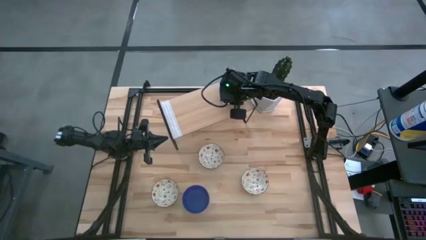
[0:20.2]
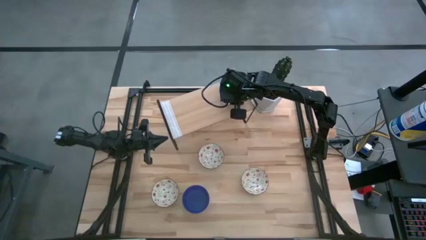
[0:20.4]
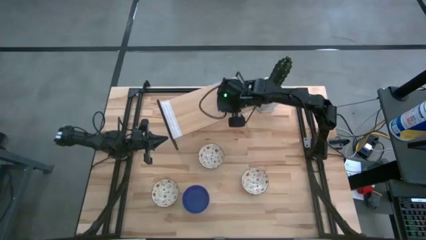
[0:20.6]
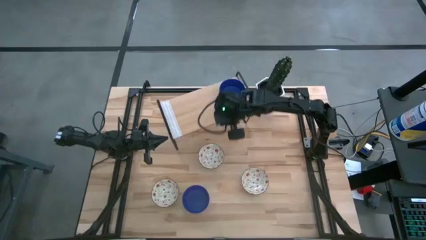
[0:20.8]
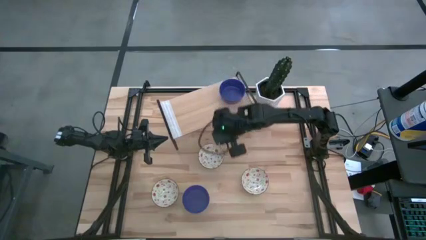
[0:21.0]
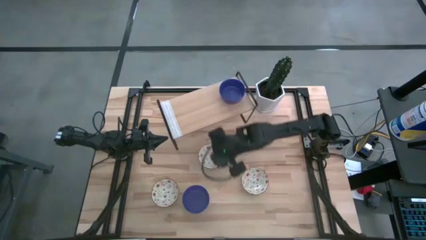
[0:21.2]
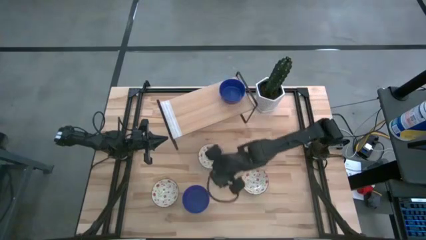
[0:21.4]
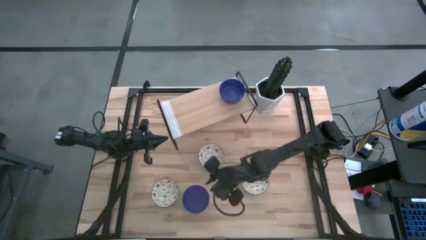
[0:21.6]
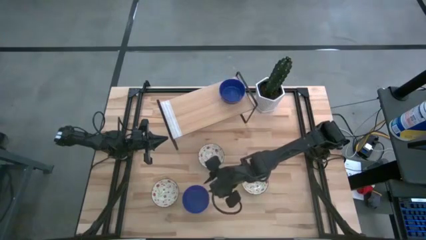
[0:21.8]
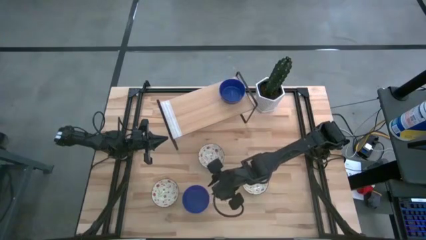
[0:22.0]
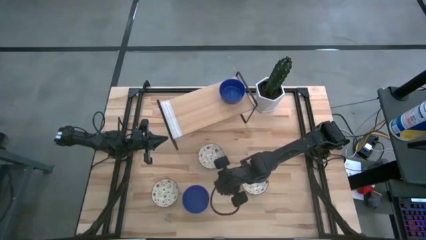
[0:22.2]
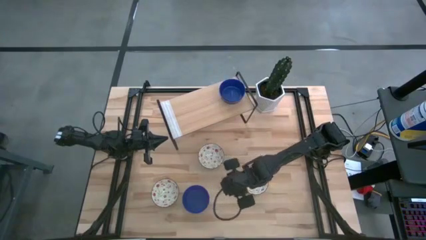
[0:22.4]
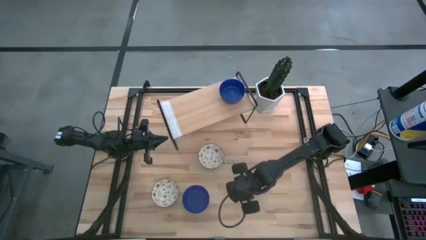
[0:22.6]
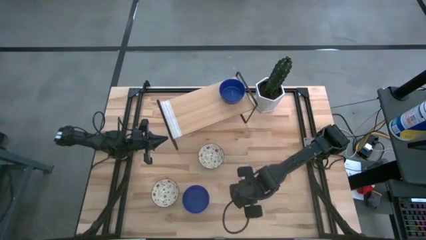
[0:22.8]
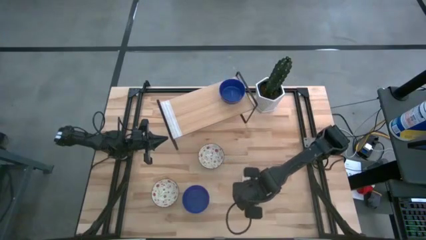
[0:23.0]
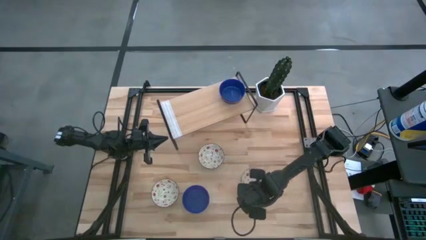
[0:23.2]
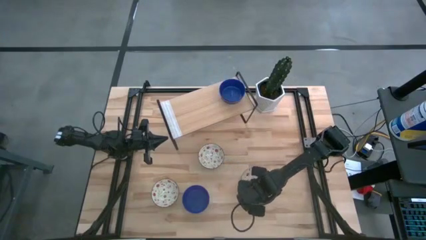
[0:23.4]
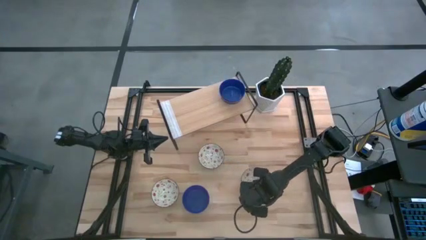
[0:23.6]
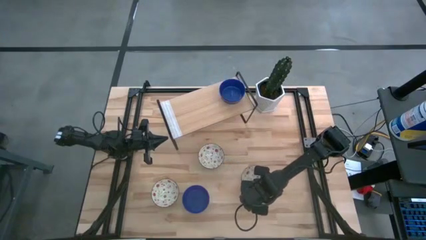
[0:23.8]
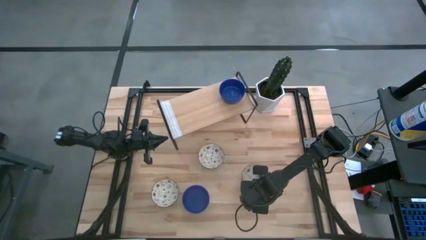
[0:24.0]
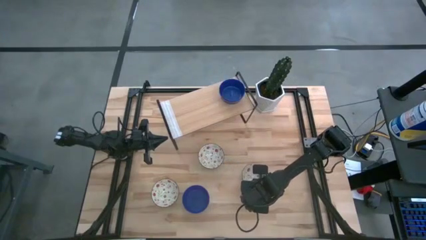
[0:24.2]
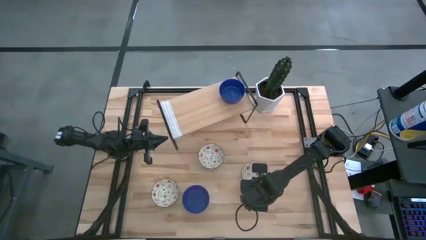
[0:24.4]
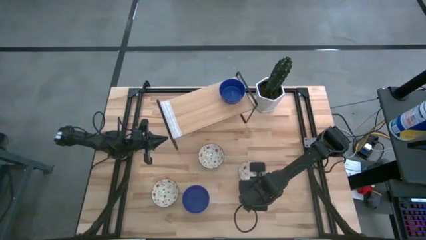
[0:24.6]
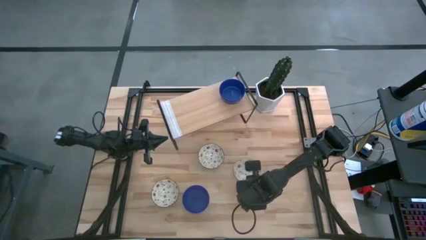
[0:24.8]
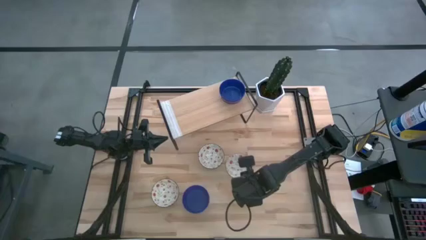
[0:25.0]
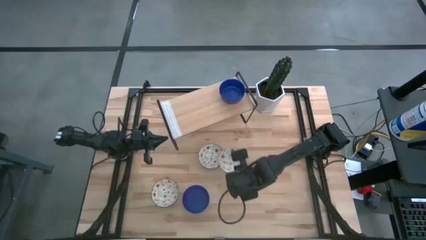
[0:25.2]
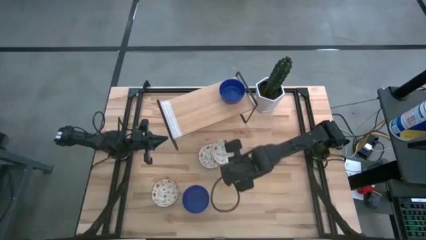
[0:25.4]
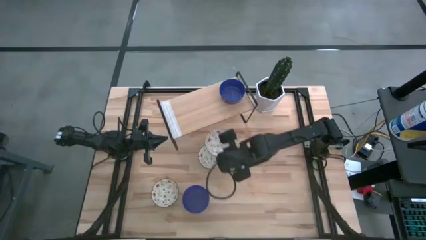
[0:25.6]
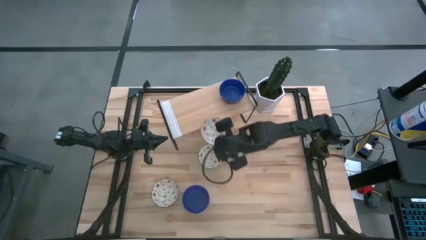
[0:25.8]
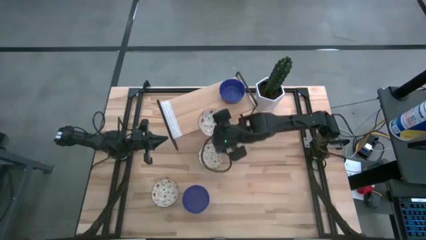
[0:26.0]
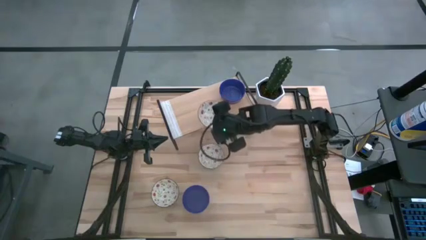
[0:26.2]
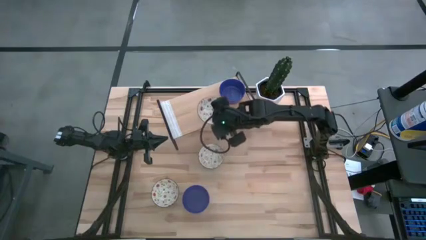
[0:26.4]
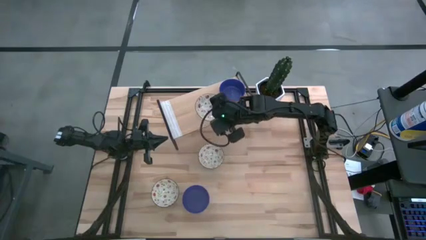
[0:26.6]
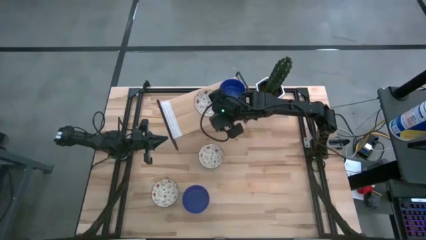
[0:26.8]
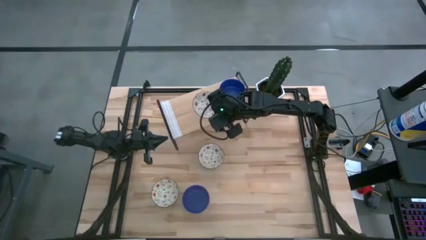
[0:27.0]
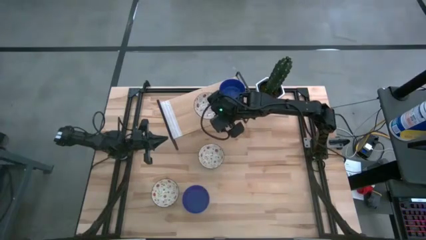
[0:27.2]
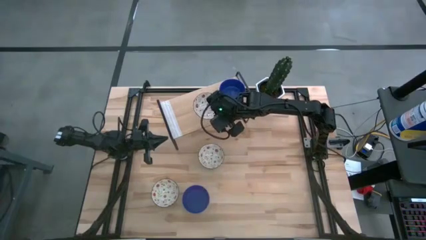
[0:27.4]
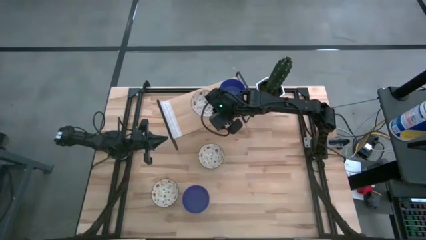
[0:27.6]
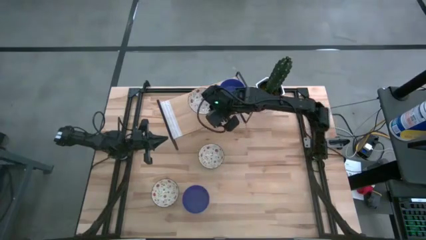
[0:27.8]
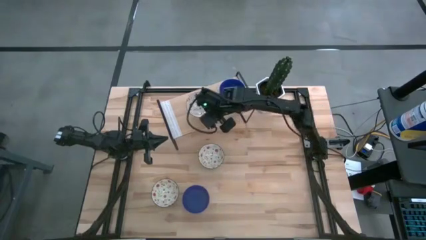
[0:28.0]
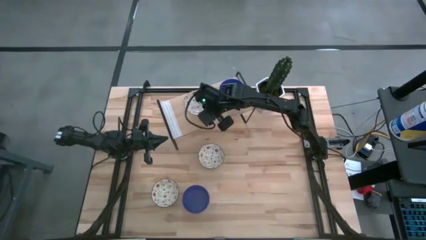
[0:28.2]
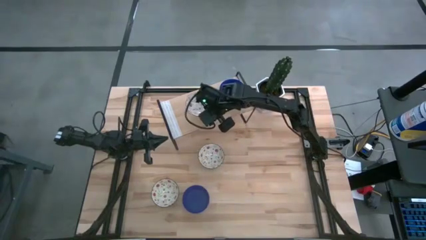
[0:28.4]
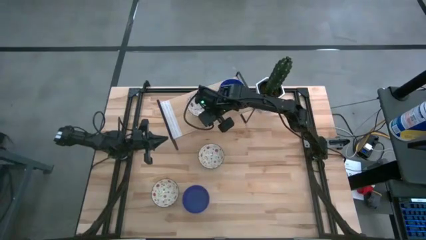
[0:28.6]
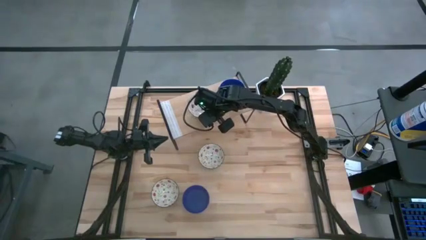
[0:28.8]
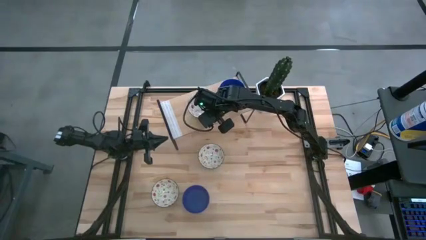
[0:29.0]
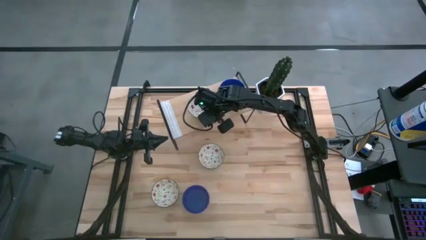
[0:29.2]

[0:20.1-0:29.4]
Task: Pick & Place Mini bowls
Put the bottom right white patterned bowl on the shelf

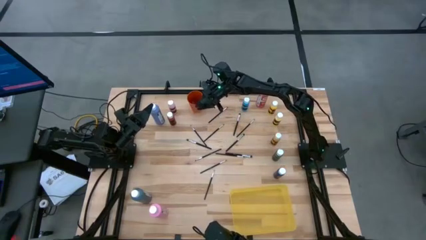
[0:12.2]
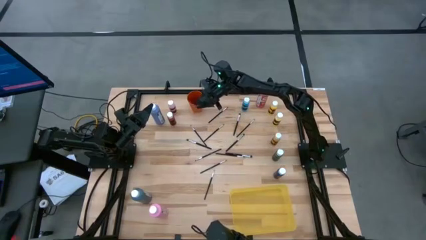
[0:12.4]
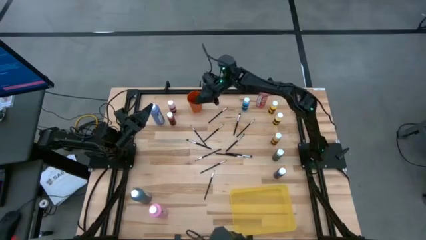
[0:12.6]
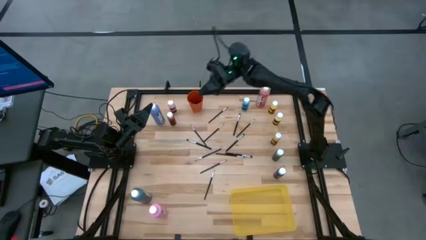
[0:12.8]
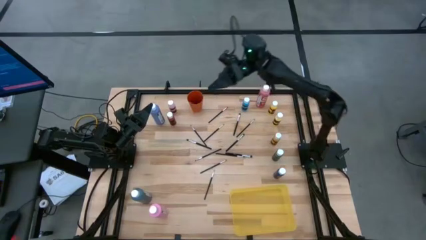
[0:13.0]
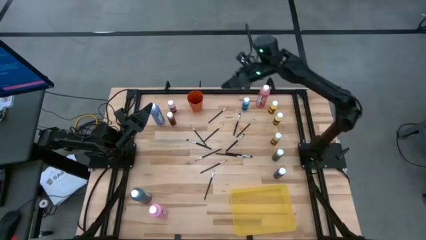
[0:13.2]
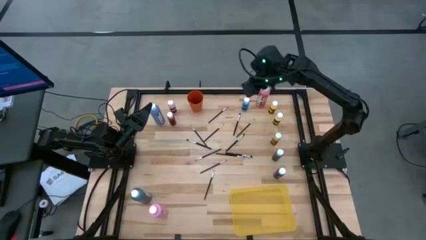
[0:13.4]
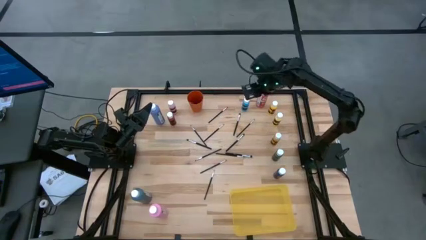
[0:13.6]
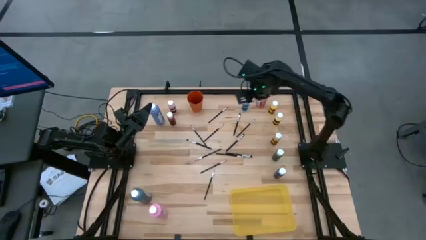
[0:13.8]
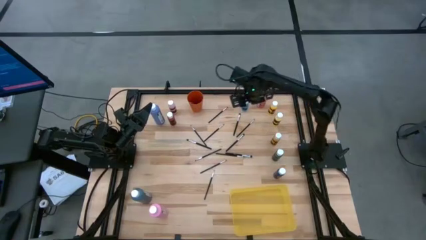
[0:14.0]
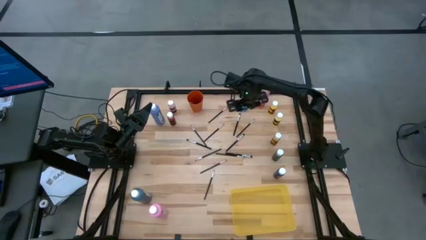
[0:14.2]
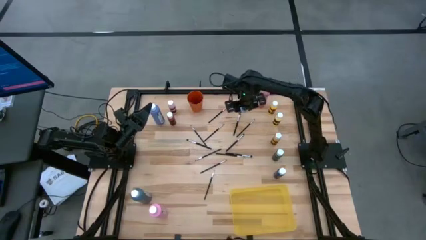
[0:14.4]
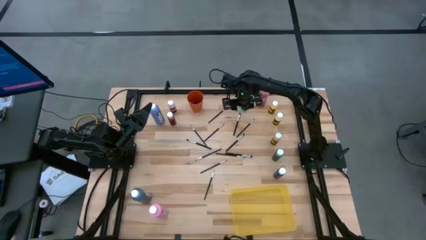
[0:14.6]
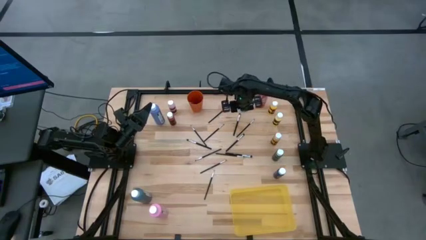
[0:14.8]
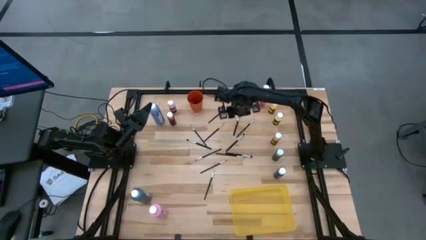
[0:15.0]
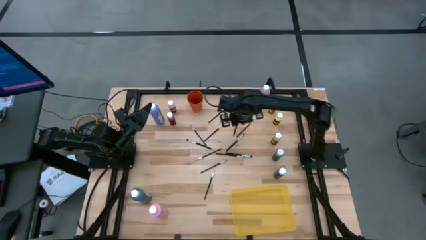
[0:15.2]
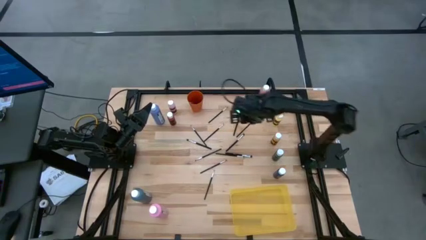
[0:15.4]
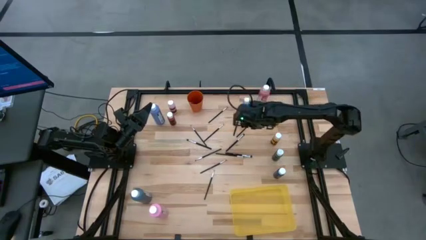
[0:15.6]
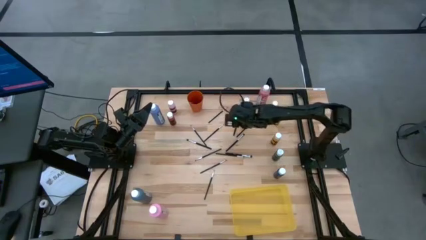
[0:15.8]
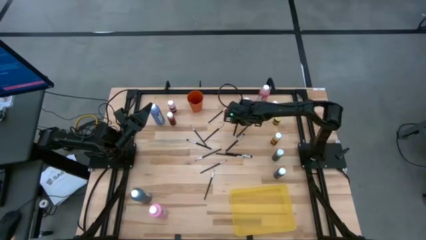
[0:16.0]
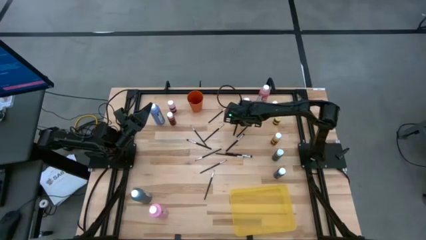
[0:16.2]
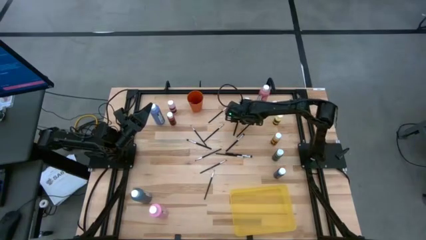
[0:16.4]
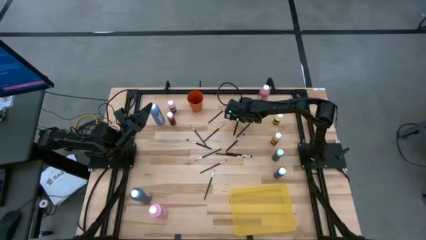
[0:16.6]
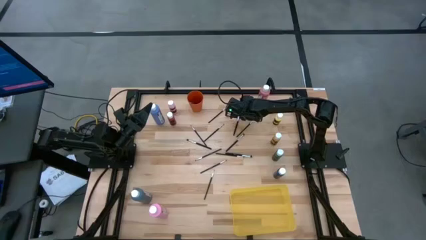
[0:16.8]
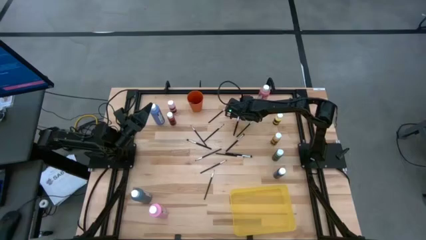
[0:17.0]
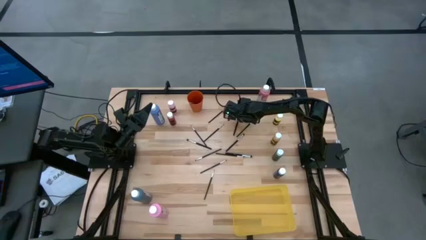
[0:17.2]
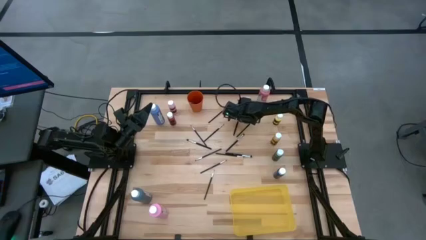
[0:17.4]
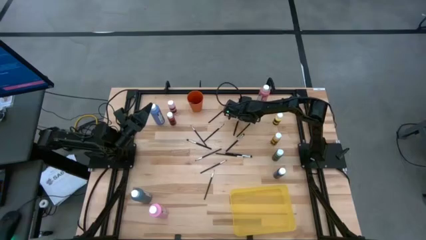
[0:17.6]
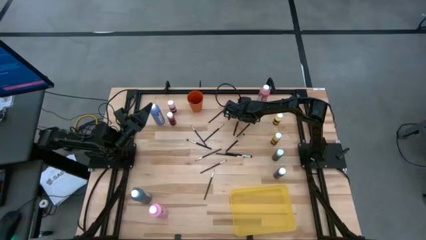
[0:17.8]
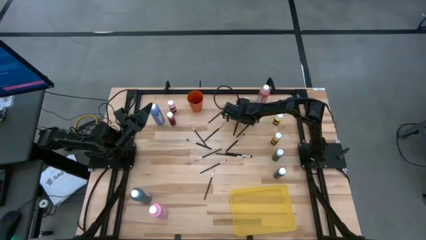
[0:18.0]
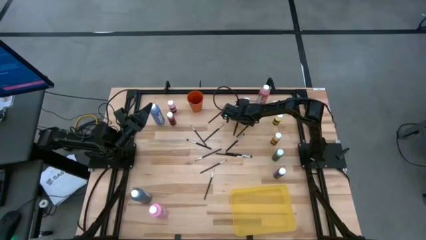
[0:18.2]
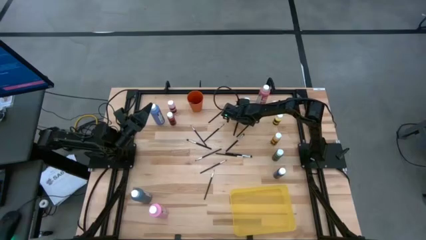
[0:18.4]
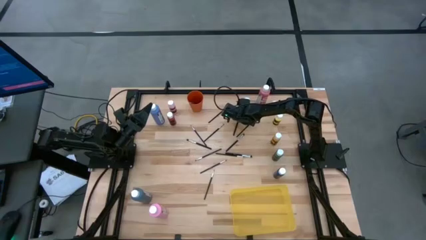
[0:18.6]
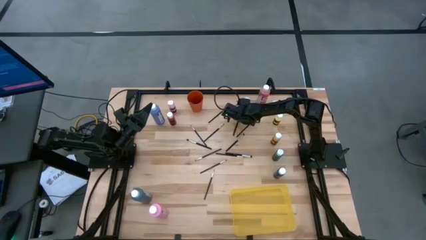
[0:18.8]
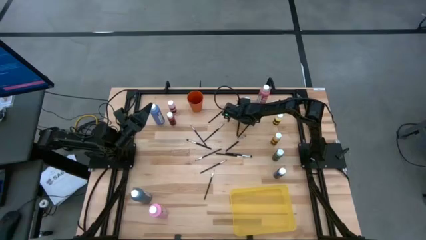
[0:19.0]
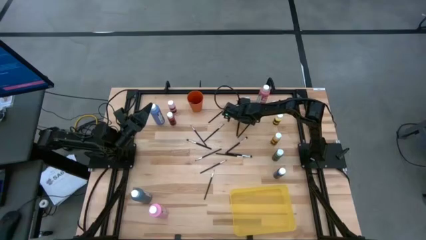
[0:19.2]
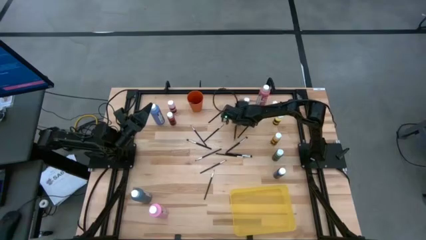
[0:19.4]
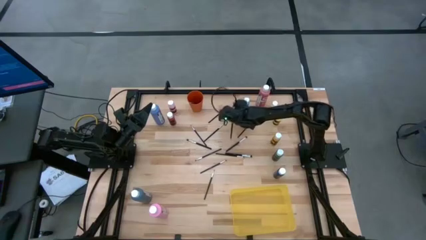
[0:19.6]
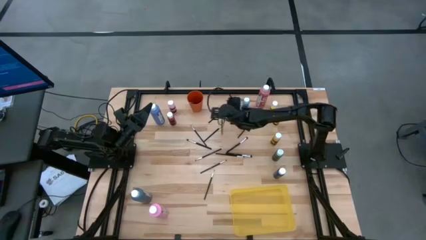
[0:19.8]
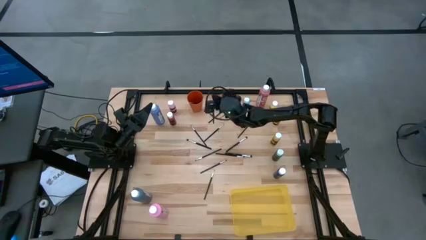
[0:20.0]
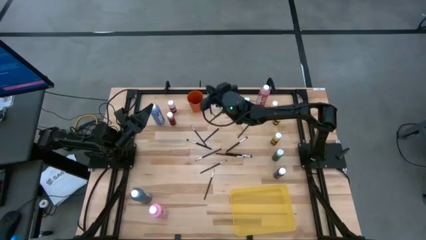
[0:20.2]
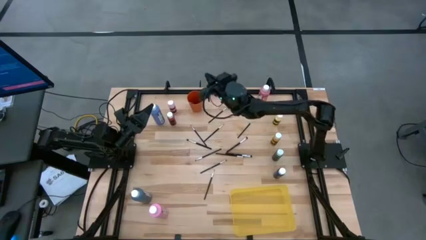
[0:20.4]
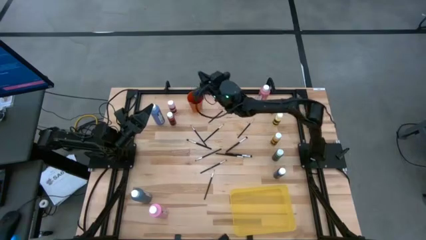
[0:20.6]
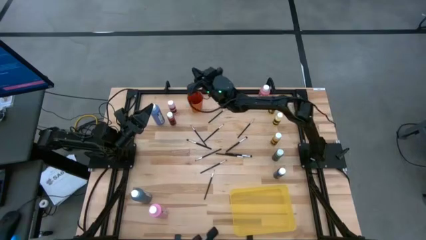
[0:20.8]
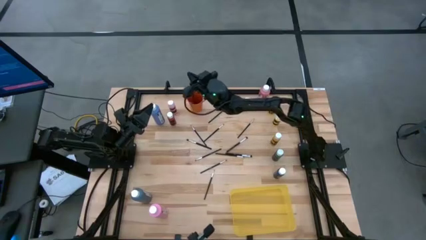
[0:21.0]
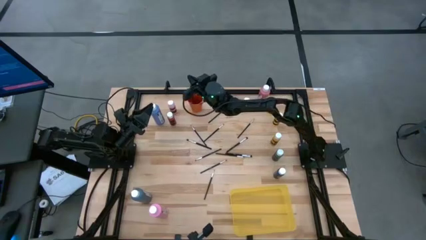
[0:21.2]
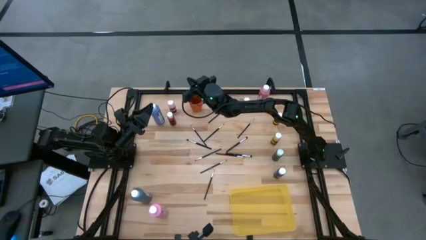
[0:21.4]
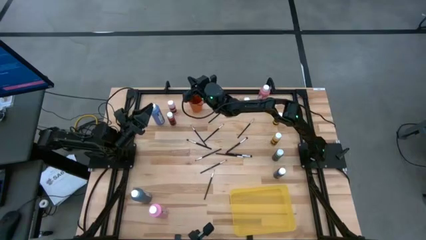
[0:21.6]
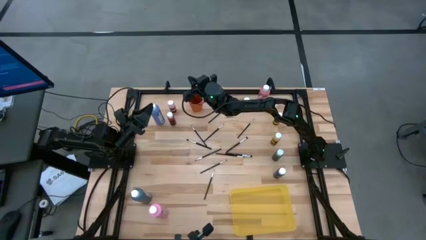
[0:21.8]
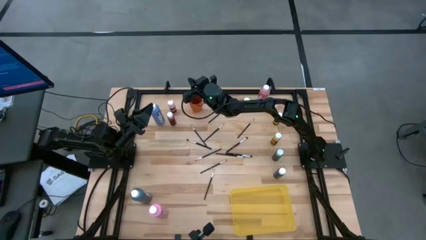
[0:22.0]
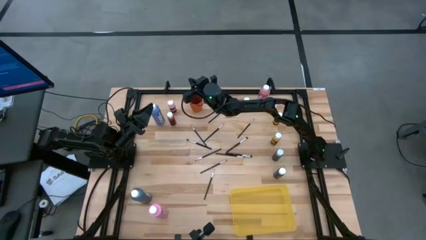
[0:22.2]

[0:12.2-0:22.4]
Task: Pick & Place Paint Supplies
Put the black paint brush into the orange cup
